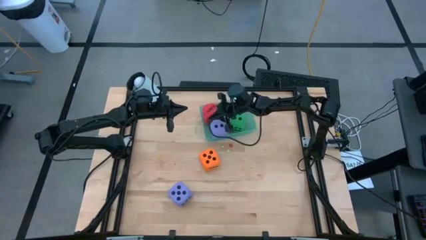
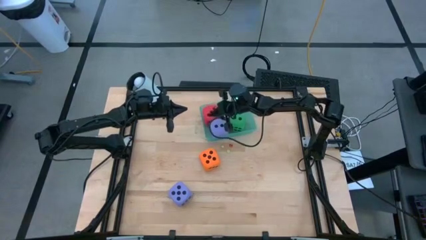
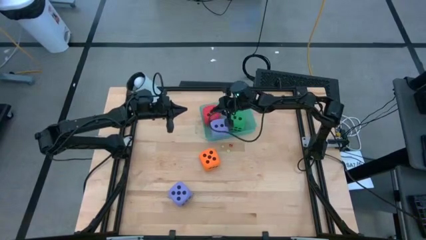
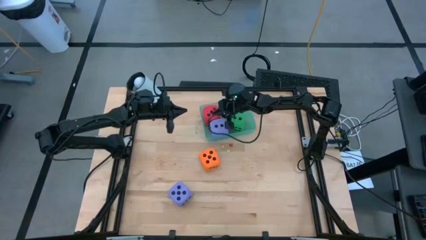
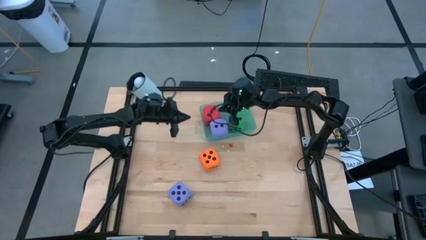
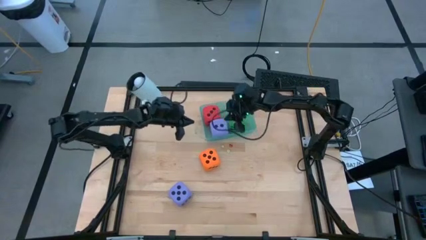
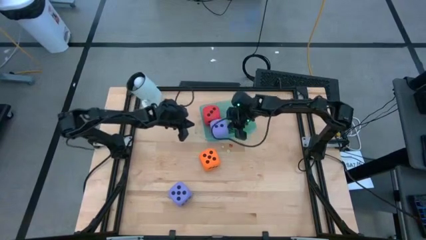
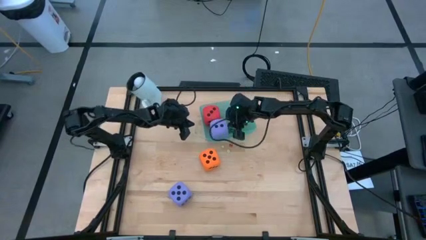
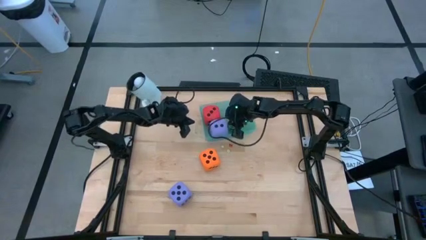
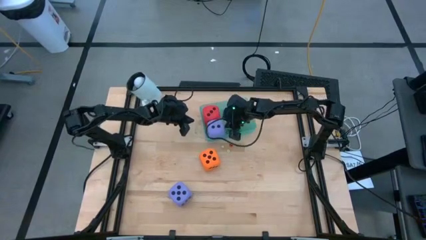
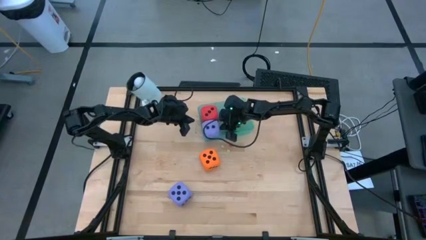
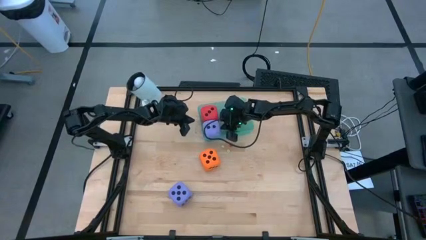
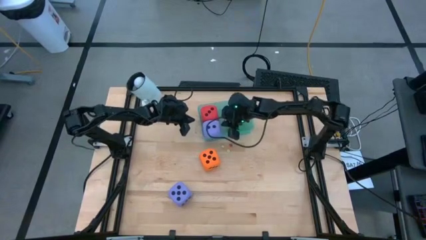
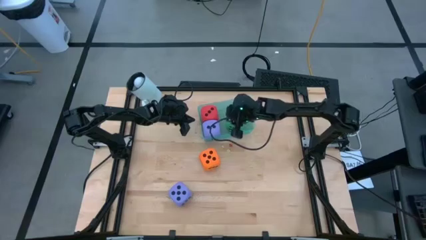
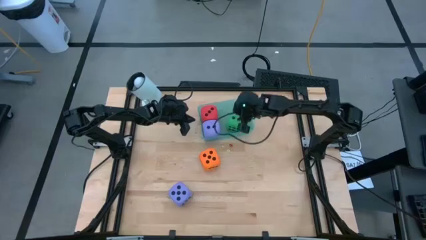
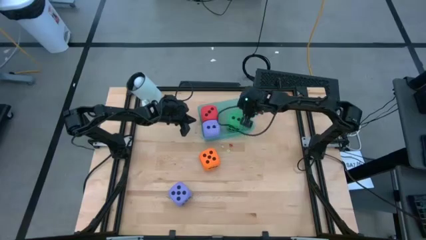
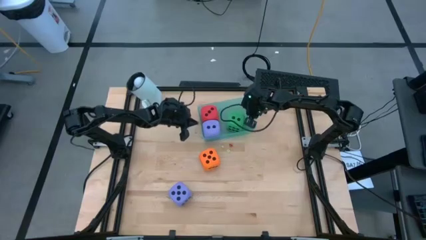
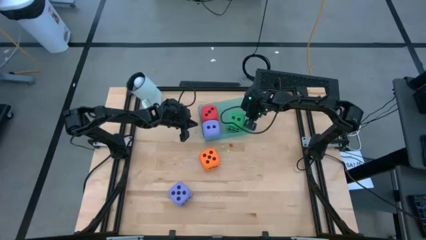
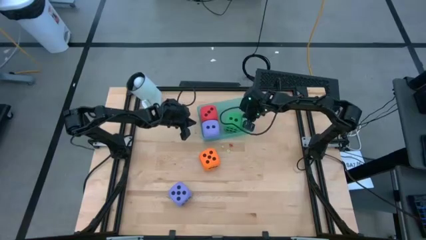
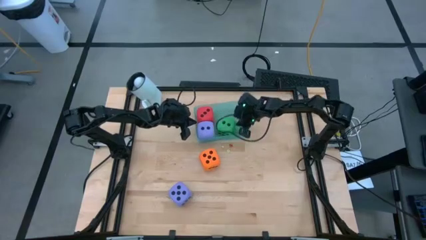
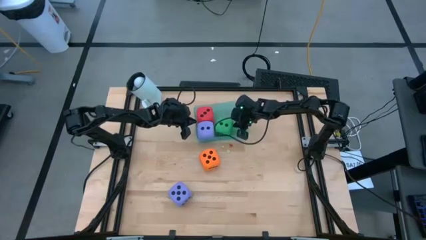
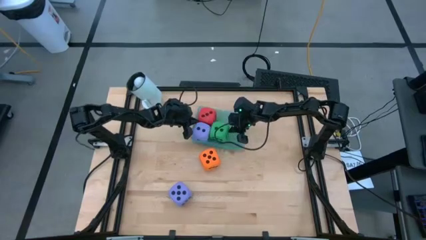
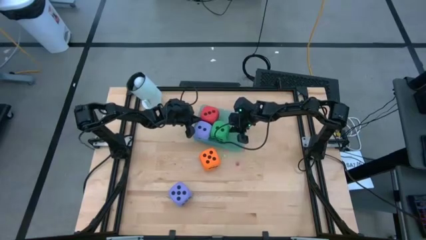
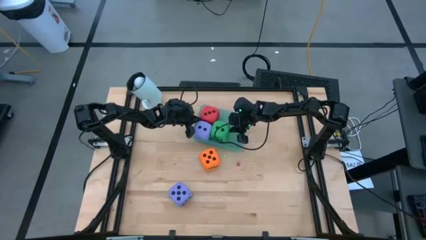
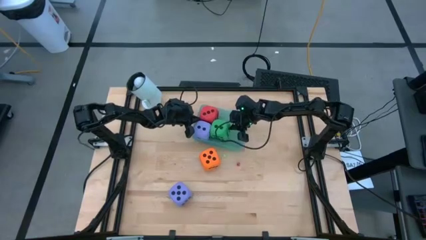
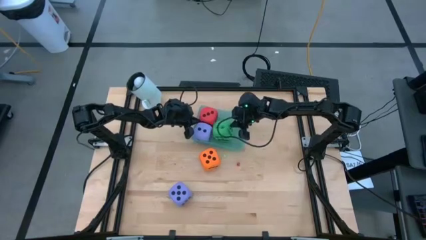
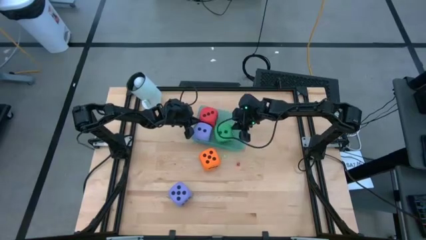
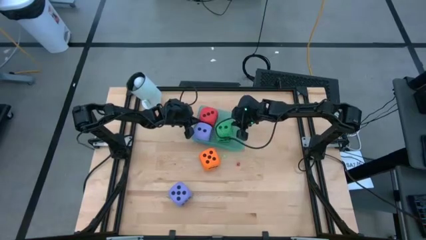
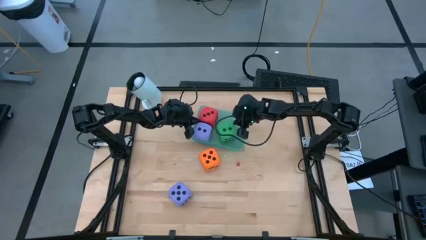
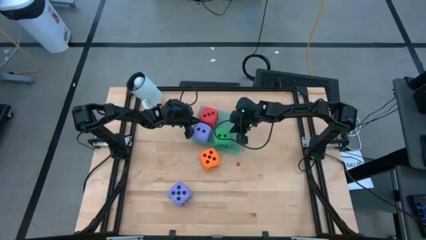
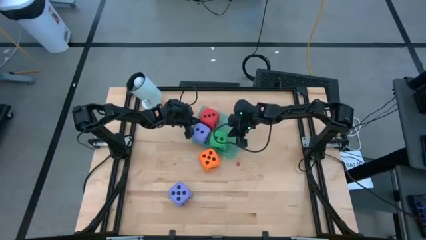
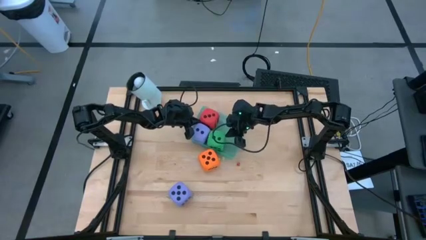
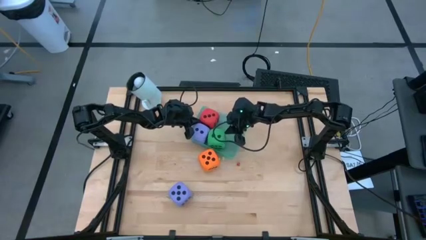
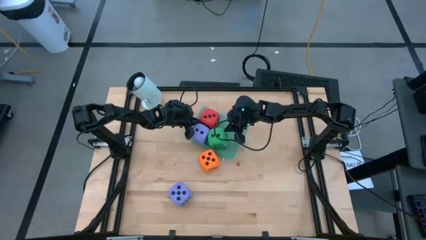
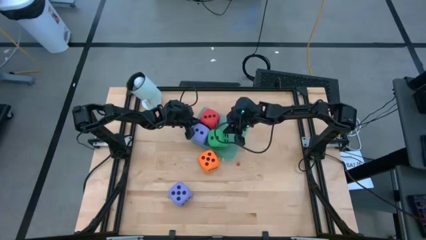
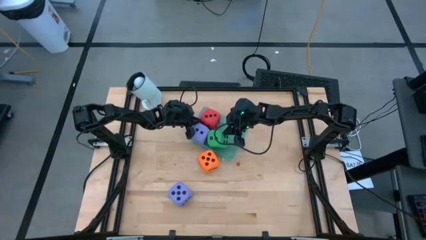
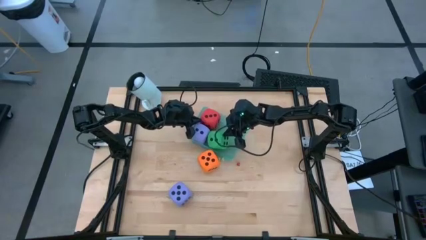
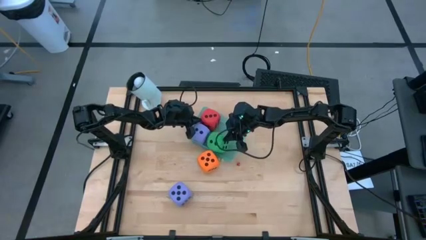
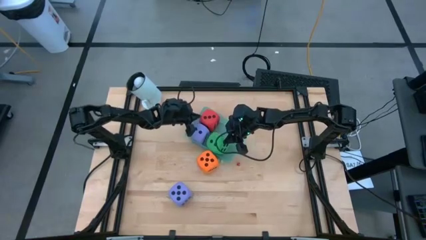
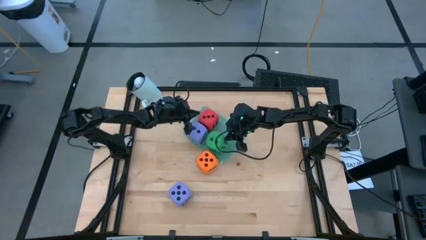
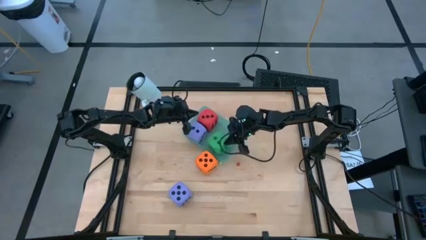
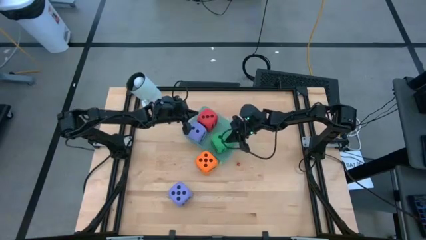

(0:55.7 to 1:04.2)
Task: Pick & Place Dice
Adjust the large dice in the light blue bin

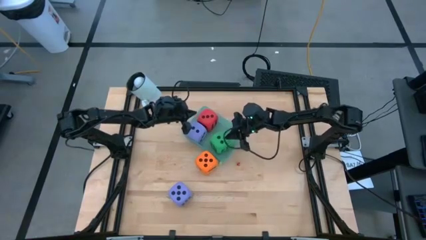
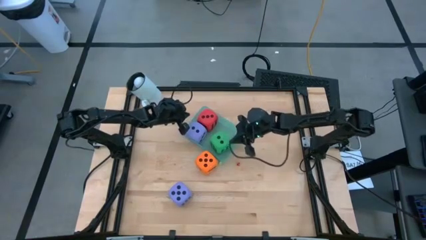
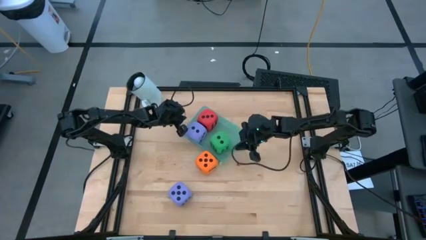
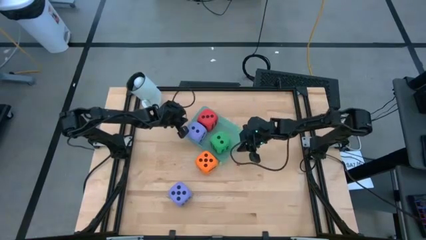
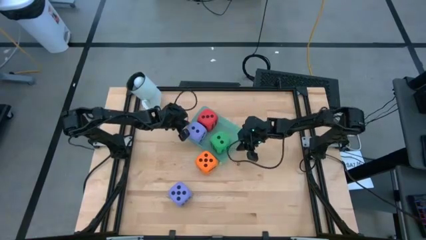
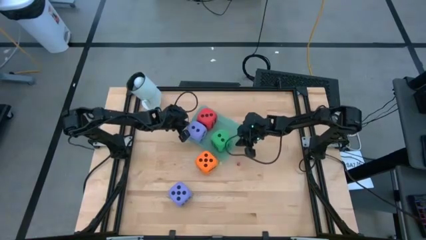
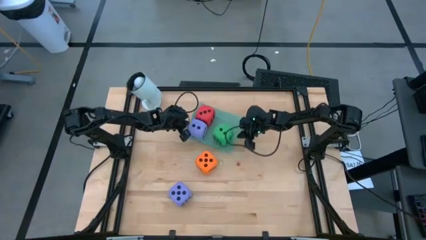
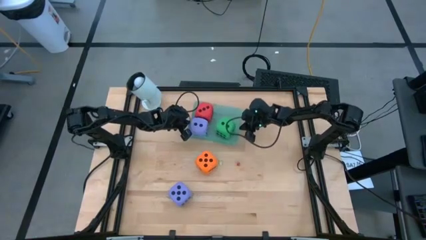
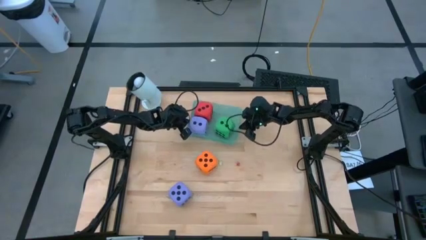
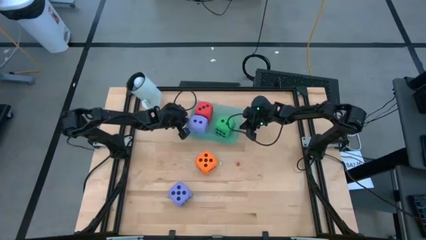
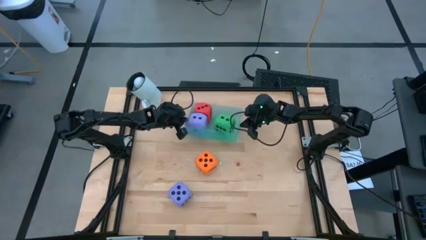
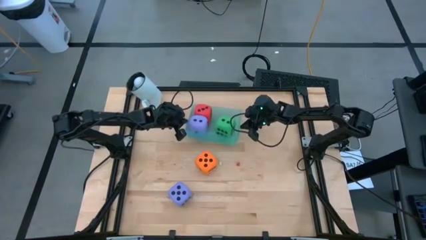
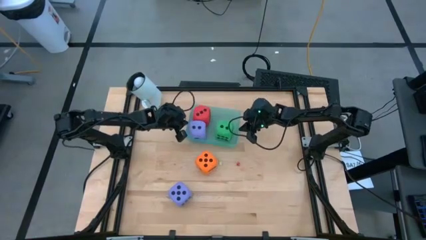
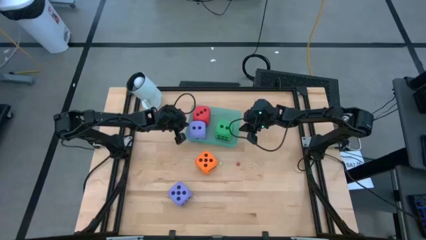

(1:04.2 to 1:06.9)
Adjust the light blue bin

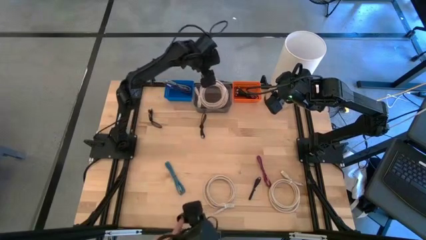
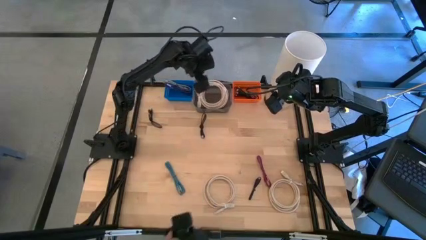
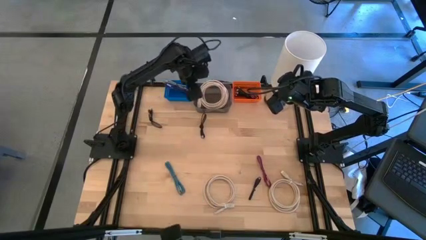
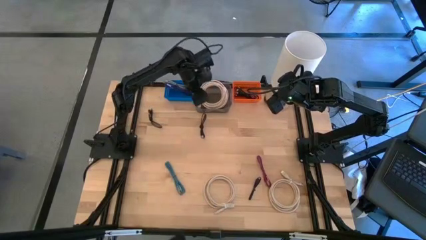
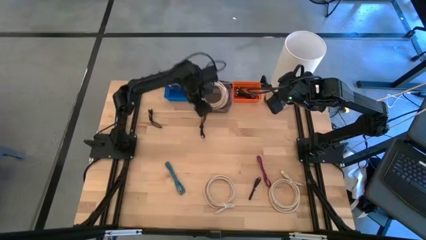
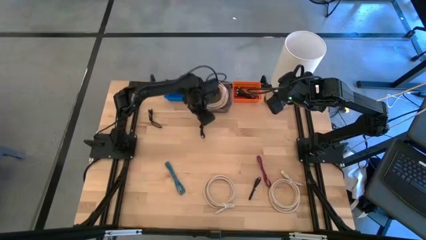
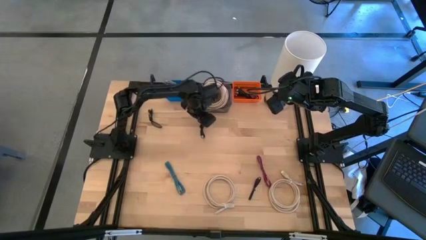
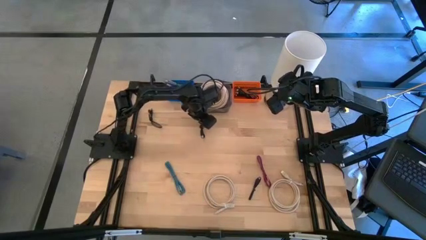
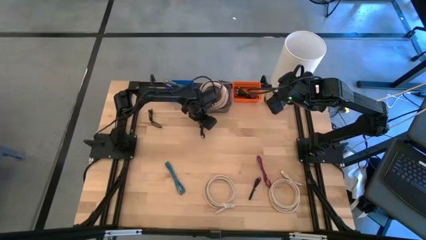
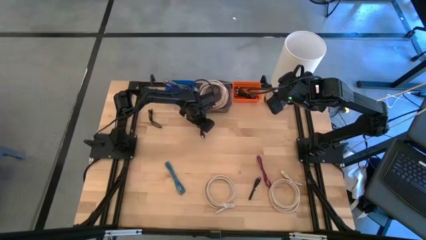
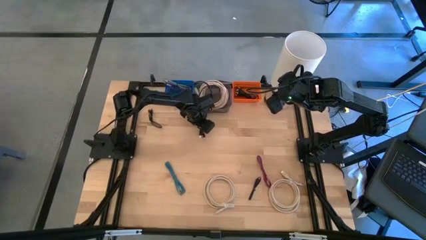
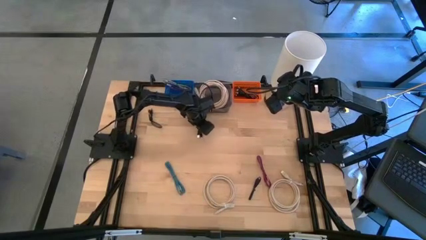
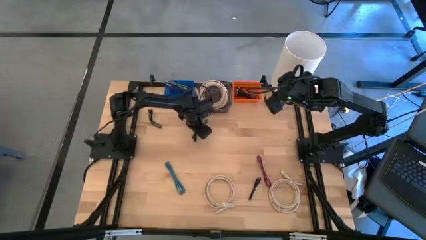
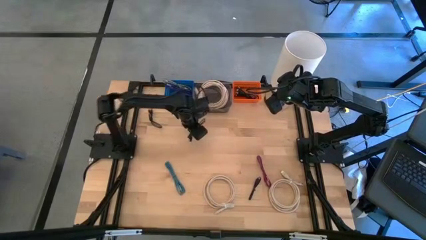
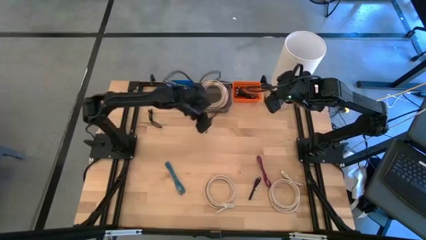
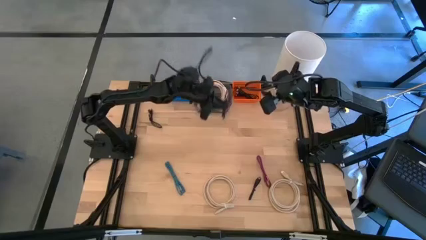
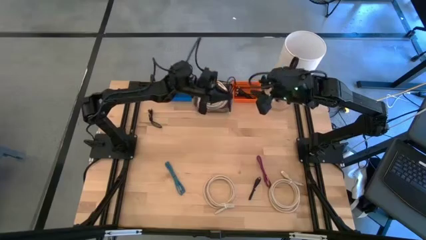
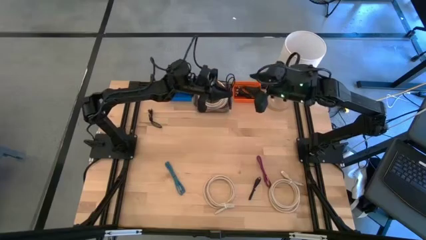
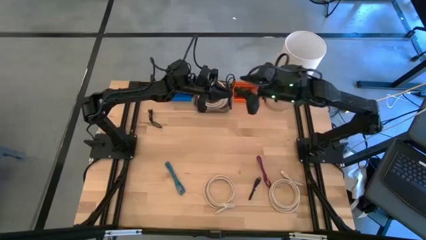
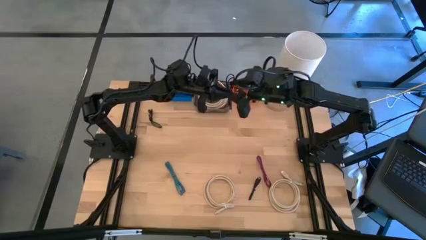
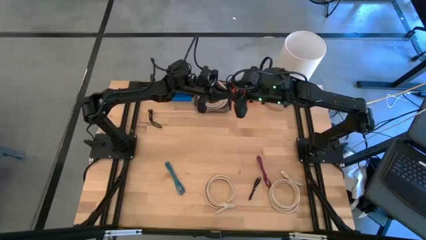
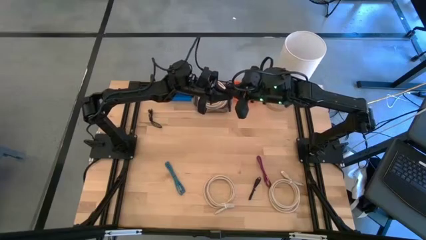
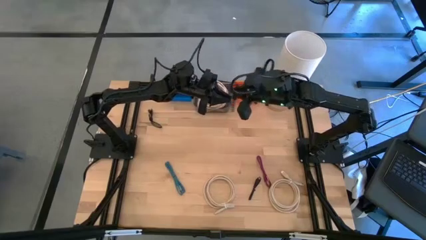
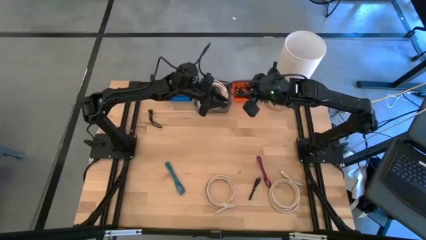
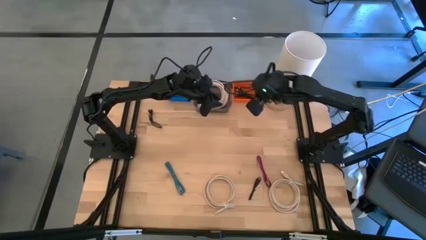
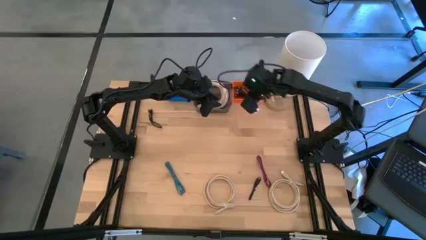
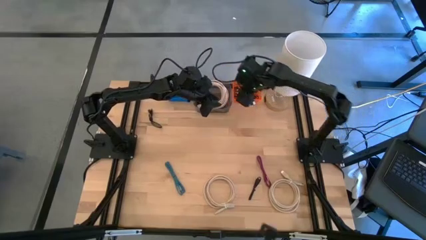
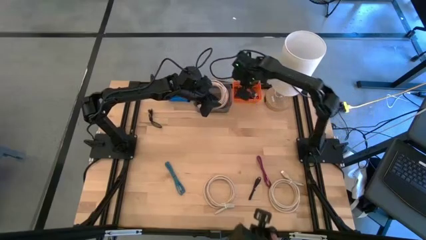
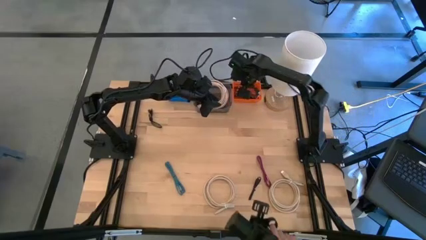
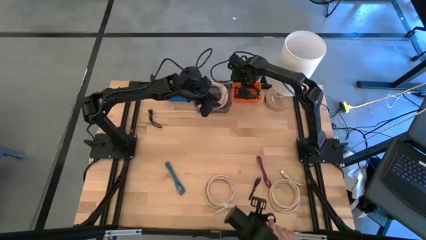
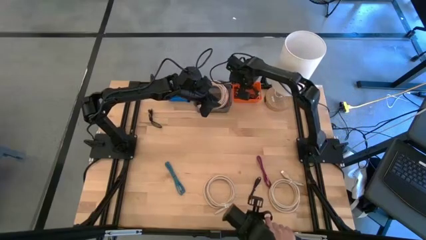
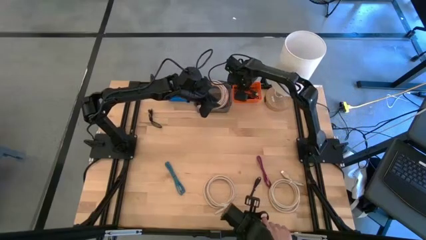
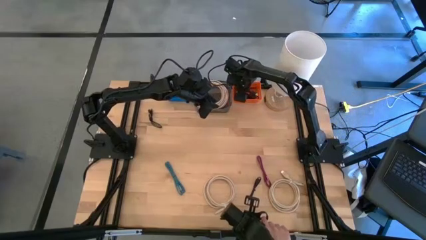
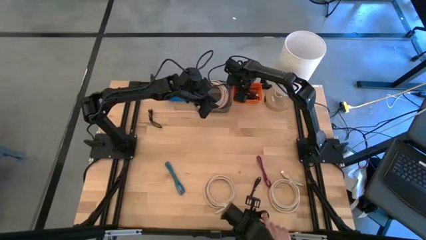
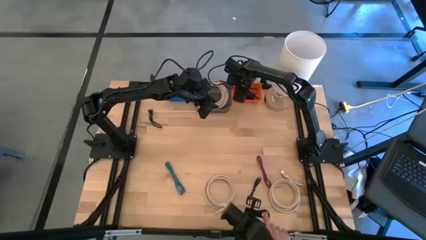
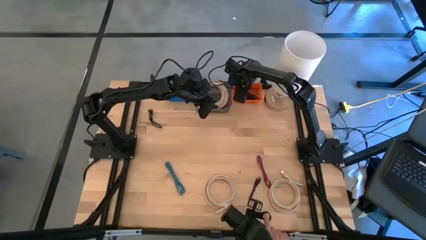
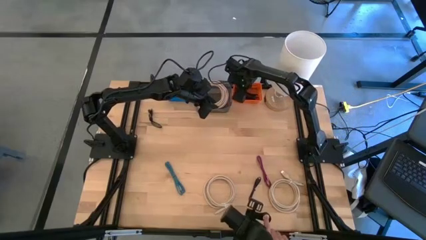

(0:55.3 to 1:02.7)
Task: Pick & Place USB Port
Put the black charger cable into the orange bin
